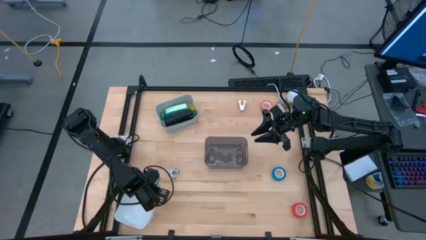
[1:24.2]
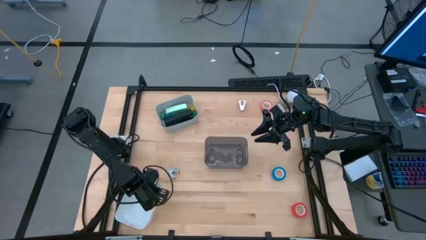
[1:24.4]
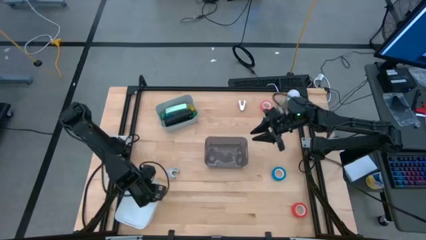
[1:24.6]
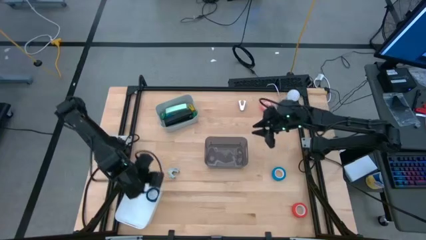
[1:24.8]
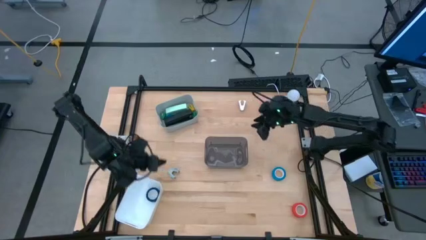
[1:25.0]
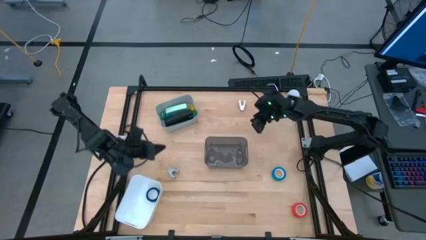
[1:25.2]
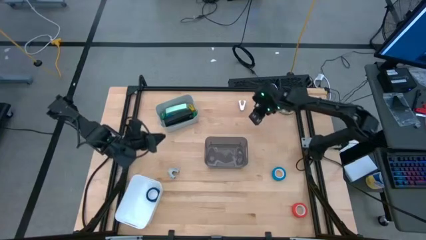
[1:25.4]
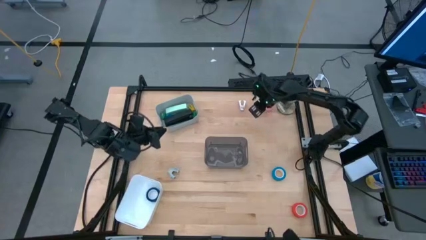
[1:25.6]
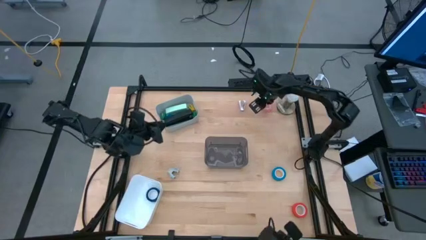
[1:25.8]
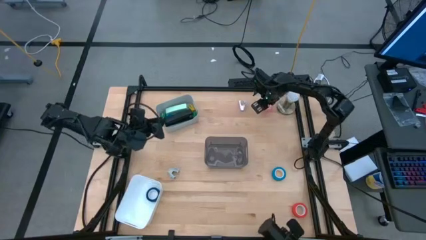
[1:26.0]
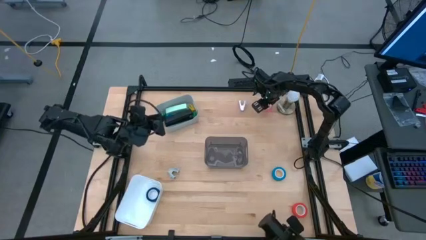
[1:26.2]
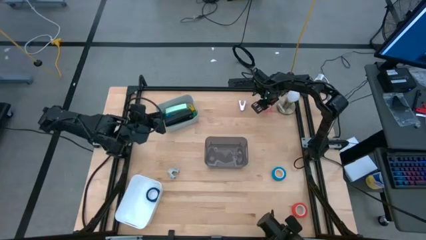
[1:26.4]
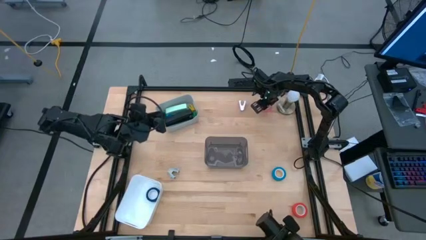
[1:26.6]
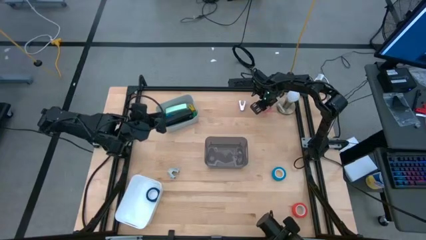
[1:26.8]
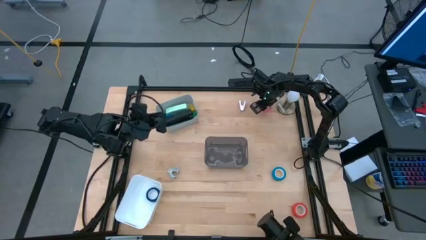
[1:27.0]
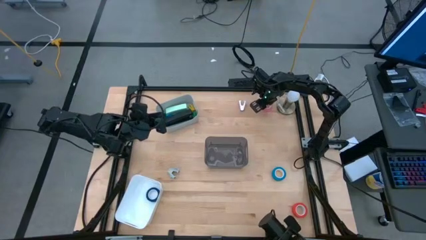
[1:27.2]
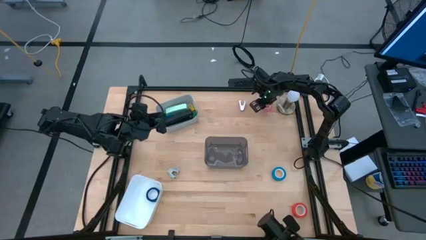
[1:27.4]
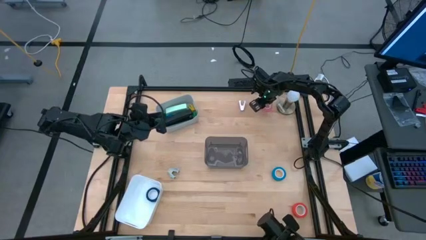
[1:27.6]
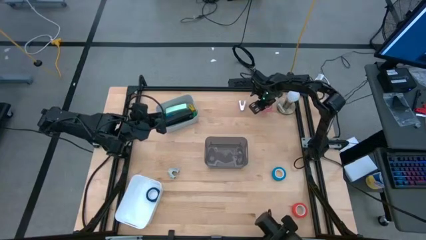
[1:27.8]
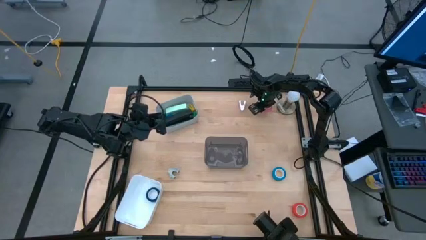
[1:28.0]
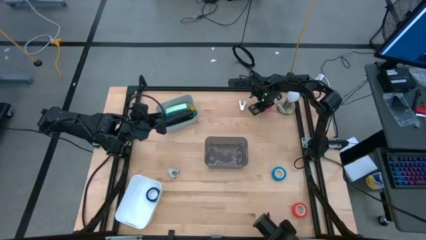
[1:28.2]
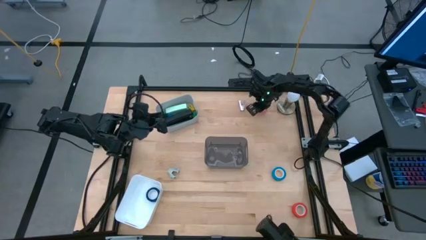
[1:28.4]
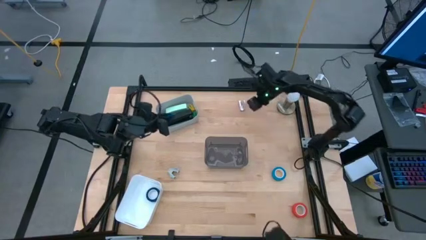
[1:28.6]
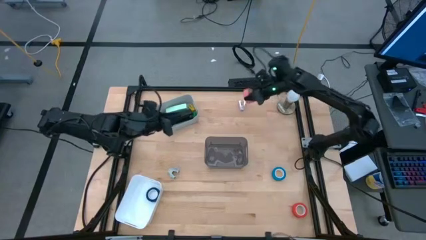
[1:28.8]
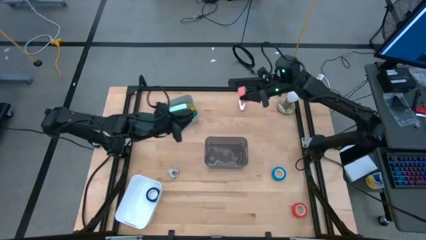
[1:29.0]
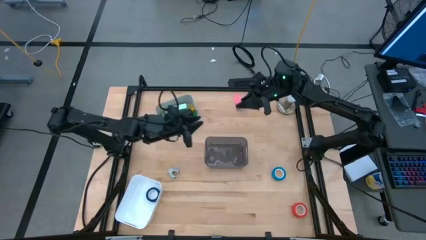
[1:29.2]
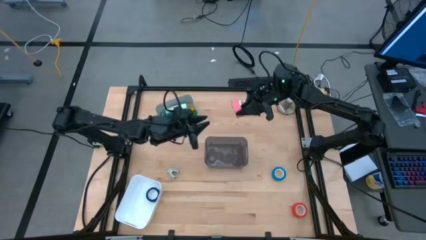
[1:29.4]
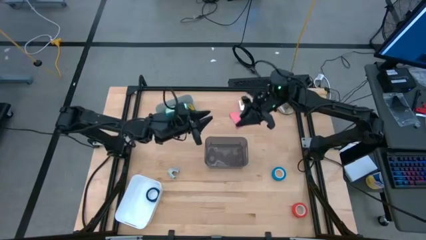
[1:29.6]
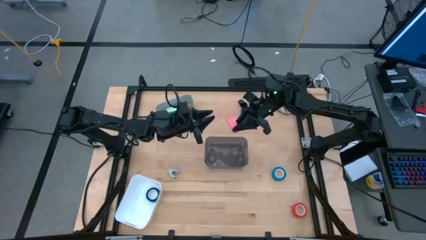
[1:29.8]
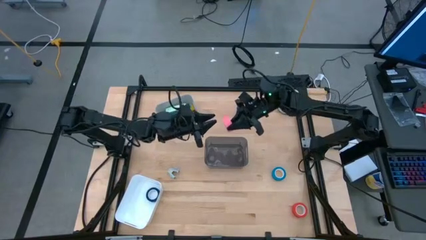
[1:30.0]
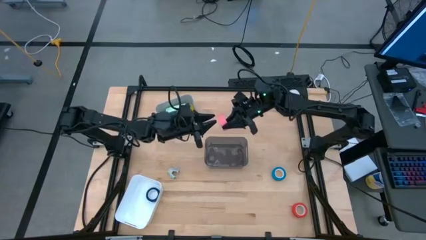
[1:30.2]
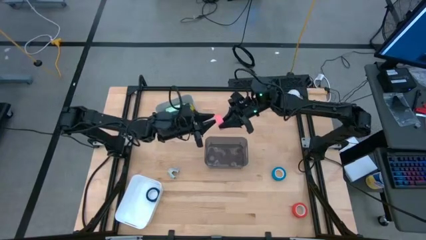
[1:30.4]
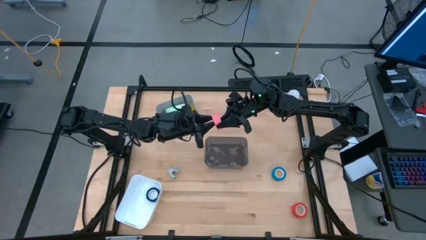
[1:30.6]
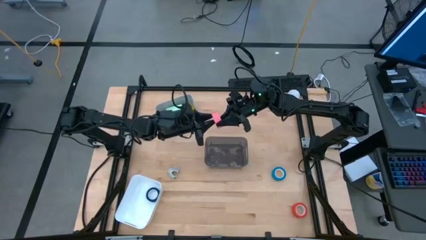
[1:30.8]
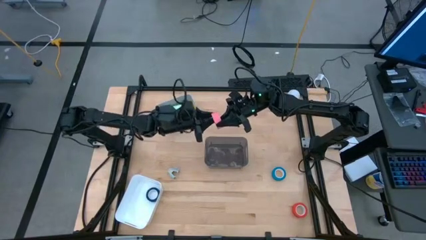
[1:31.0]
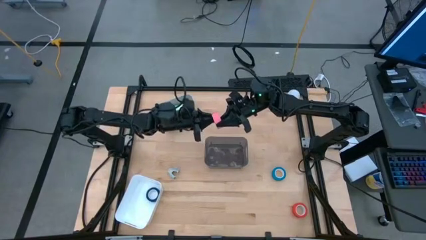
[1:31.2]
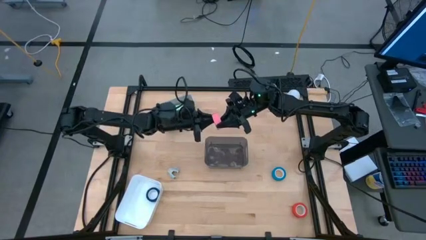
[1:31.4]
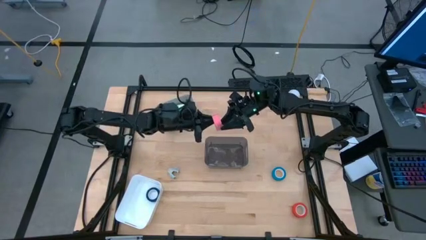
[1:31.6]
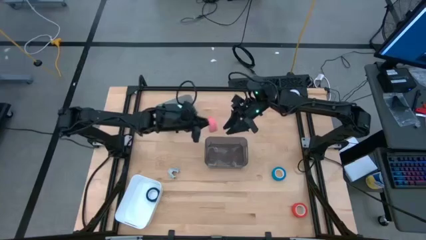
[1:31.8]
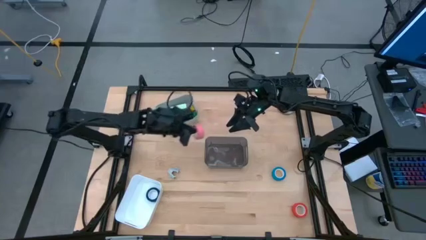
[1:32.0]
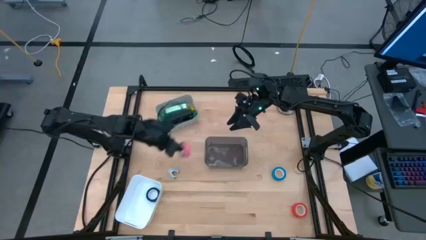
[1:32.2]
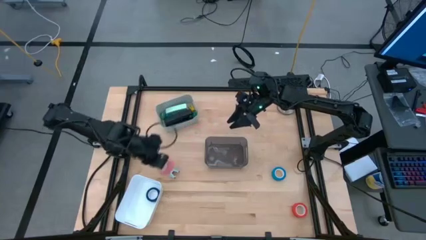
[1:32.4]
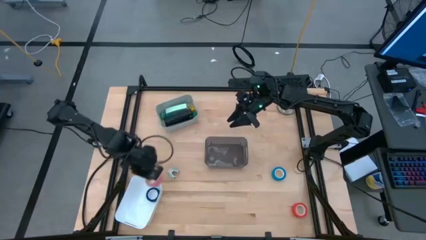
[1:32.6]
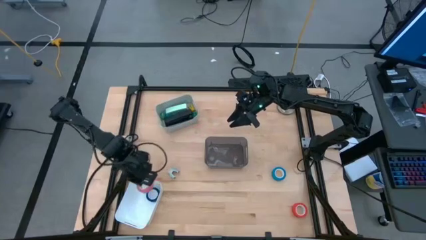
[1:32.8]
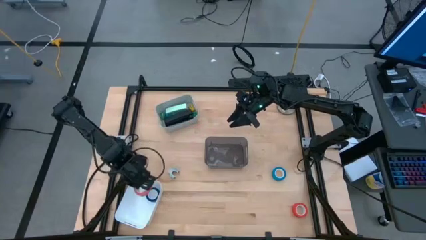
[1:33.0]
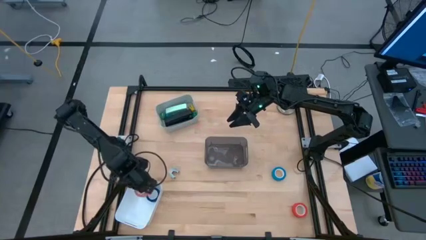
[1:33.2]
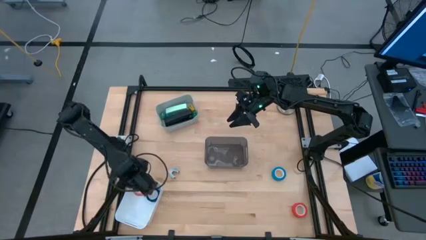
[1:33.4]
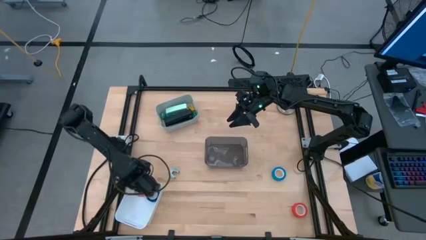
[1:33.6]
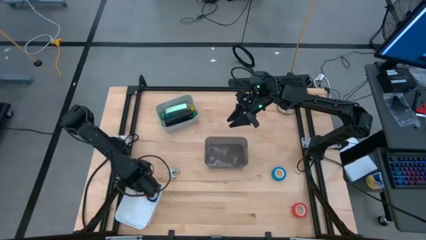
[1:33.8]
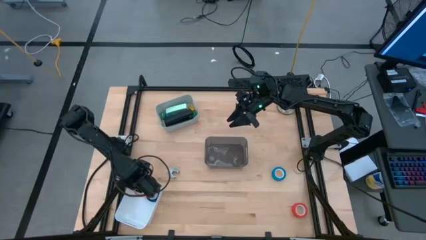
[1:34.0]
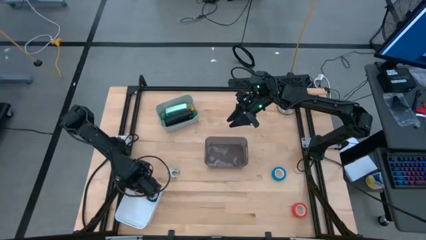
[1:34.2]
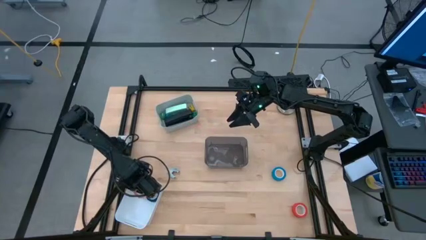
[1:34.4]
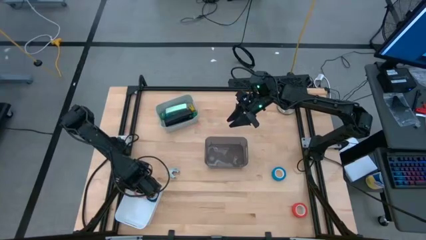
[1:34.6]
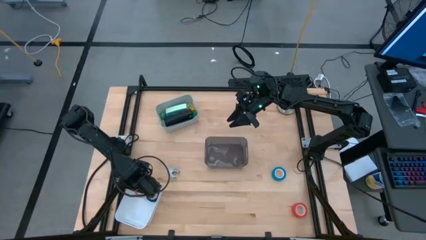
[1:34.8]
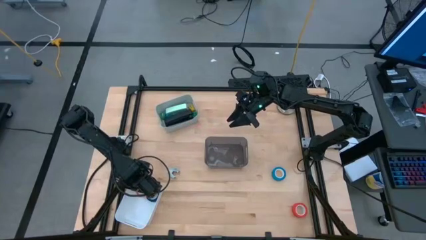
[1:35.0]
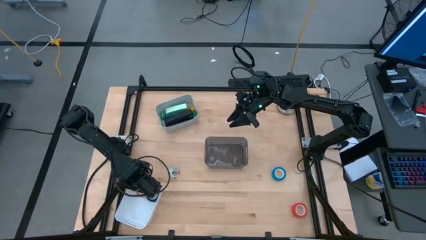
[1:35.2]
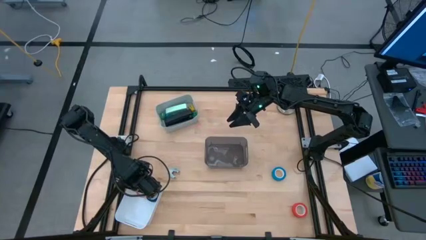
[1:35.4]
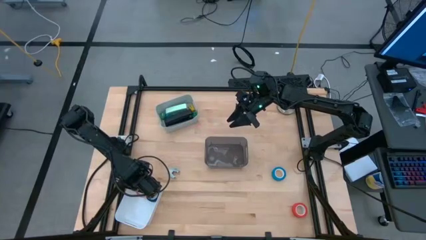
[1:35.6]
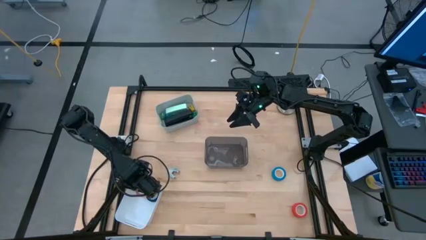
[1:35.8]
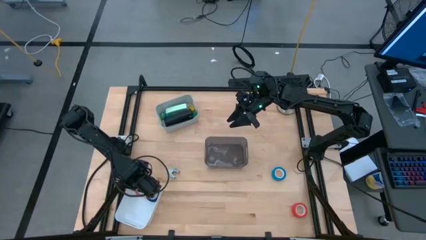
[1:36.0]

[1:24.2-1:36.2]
Task: Pick and place Stapler, Stapler remover, tape
Put the pink tape into the white bin
